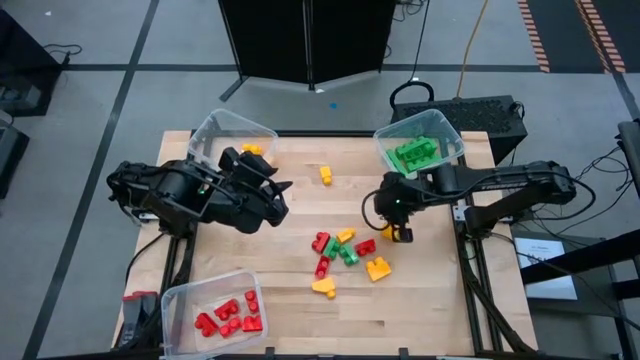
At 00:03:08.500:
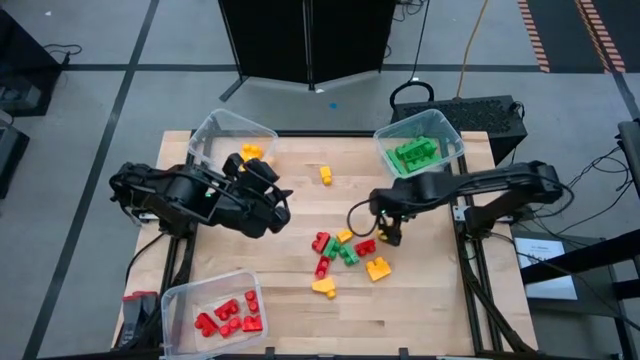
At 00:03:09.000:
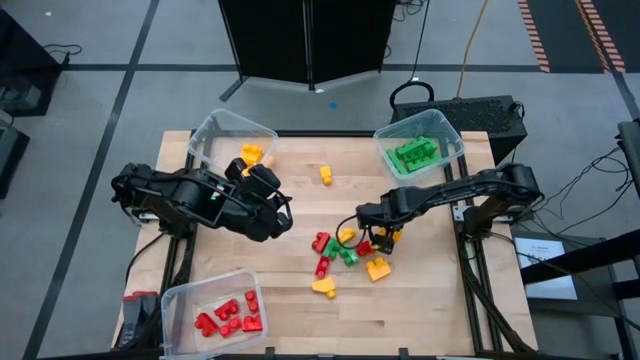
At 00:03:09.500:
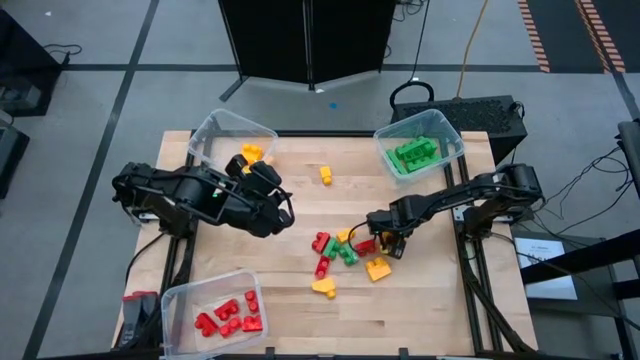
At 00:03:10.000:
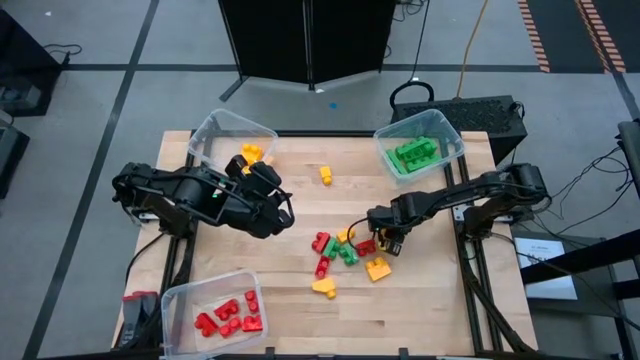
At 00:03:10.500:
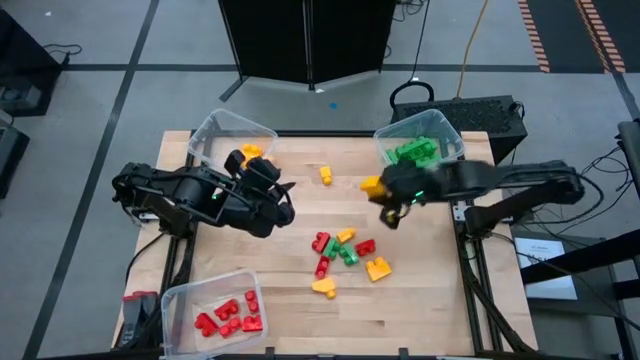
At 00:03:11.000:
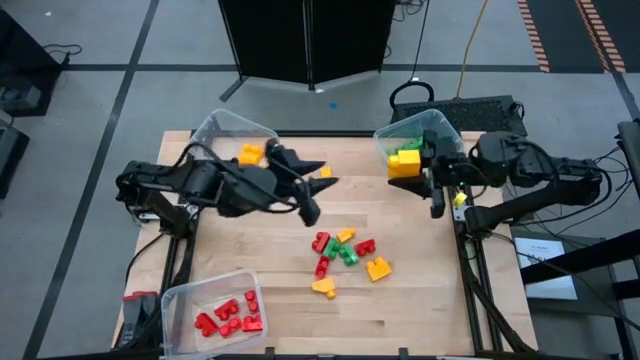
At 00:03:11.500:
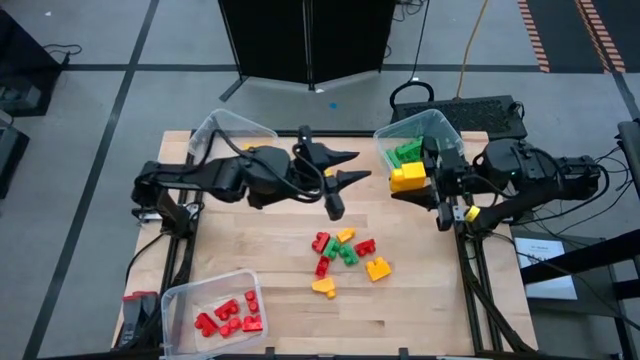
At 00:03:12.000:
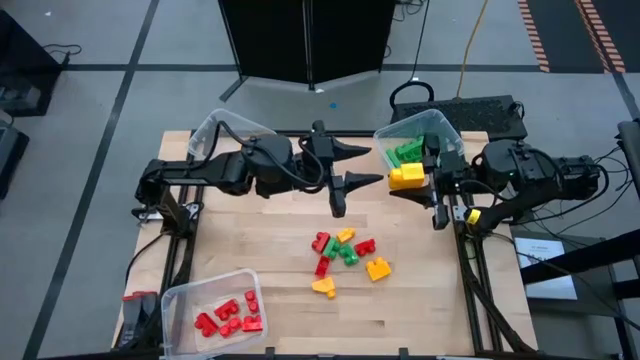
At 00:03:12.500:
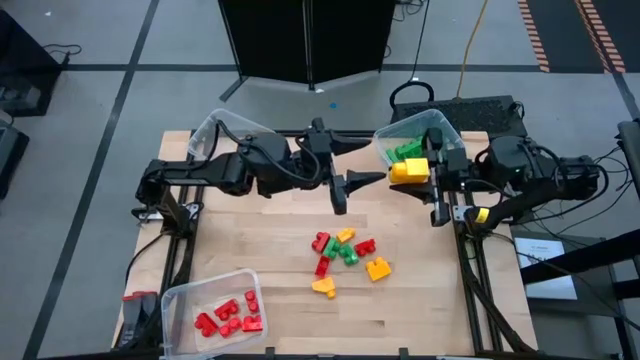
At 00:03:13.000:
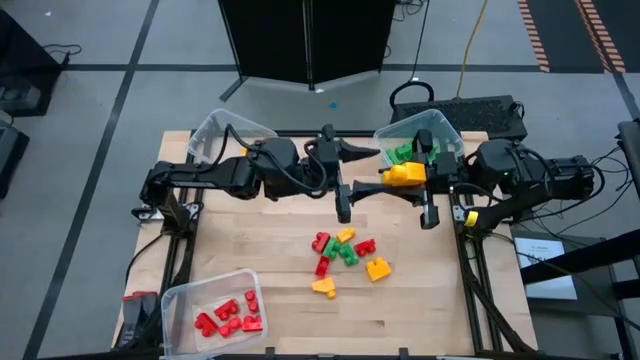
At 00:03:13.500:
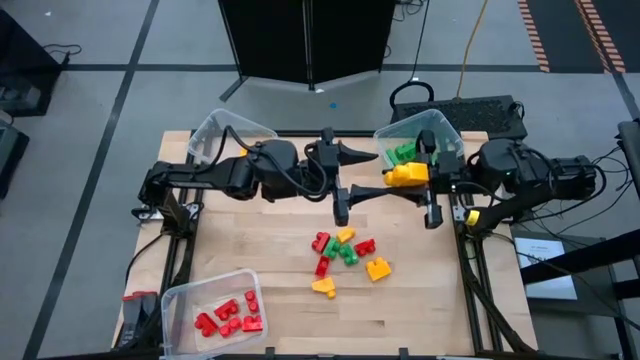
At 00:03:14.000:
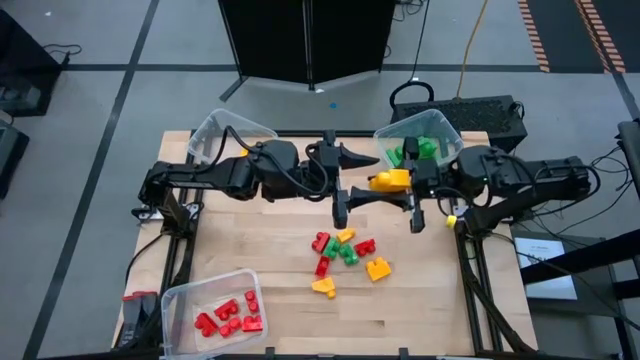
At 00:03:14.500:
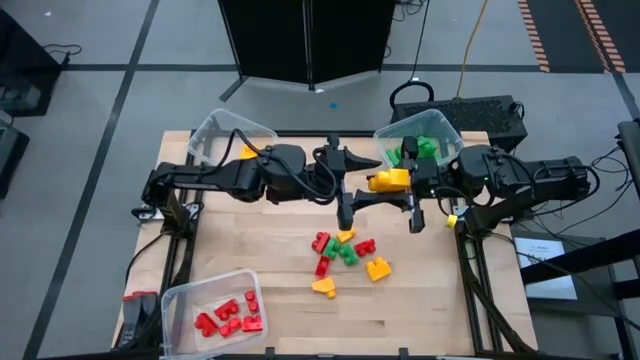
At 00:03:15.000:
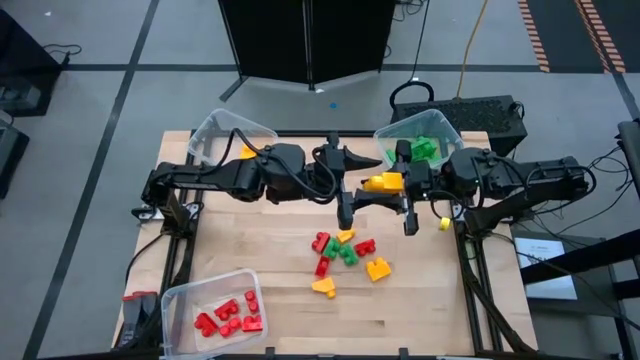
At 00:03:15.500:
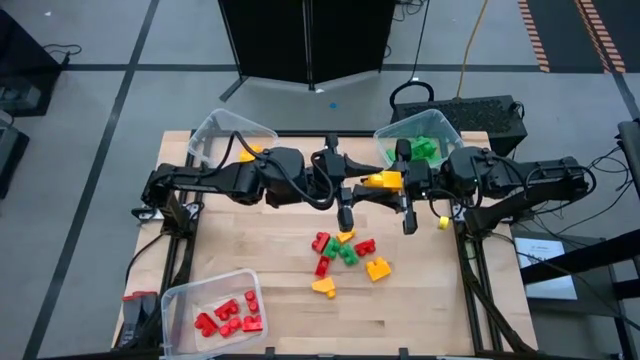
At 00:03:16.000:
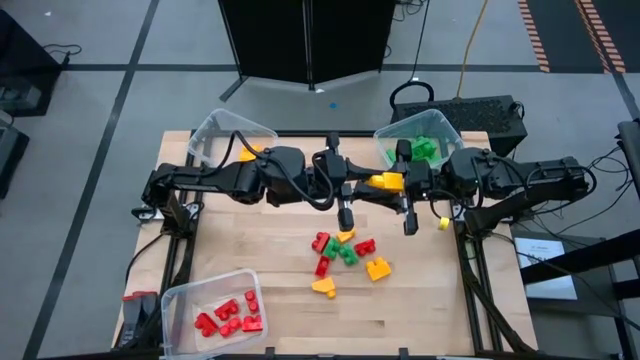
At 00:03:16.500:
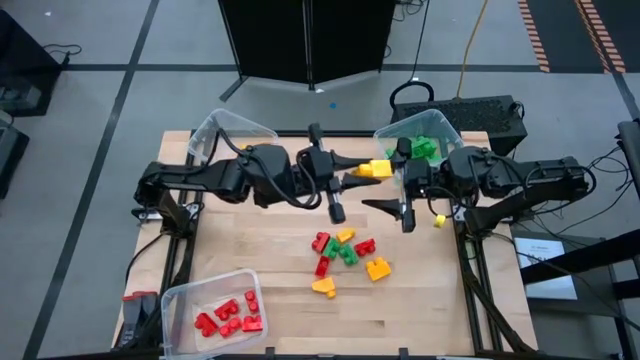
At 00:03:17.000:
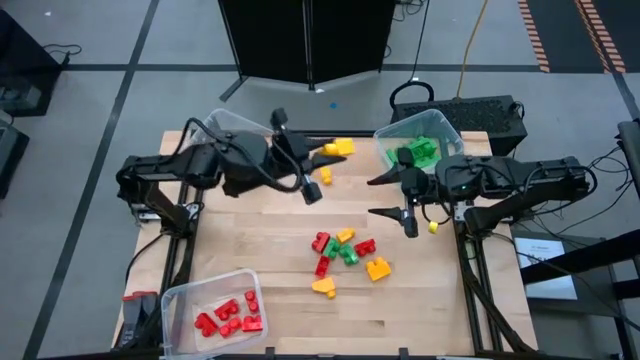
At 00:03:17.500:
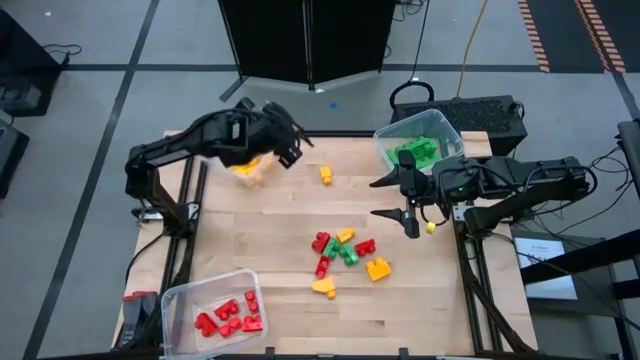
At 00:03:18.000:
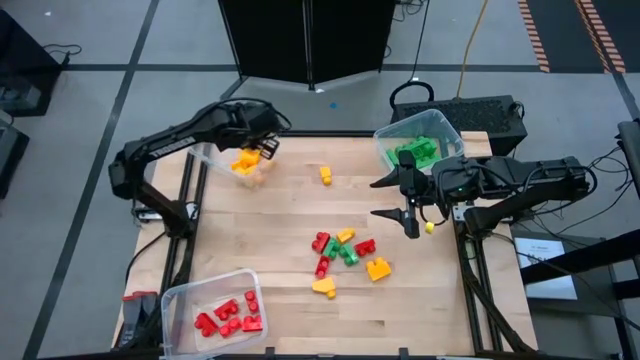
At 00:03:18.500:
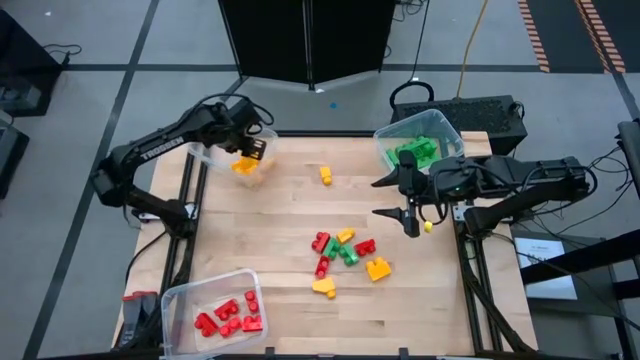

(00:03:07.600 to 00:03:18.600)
Task: Sort blocks
Put the yellow game piece into the top left transparent bin

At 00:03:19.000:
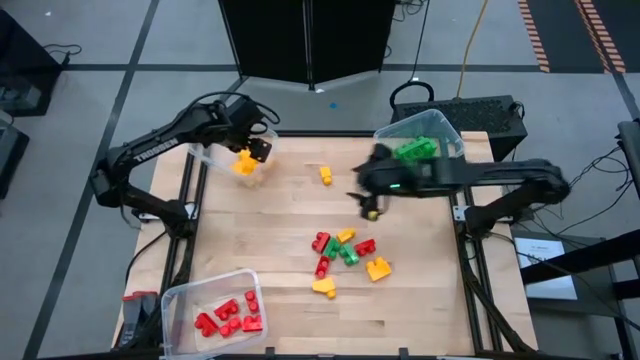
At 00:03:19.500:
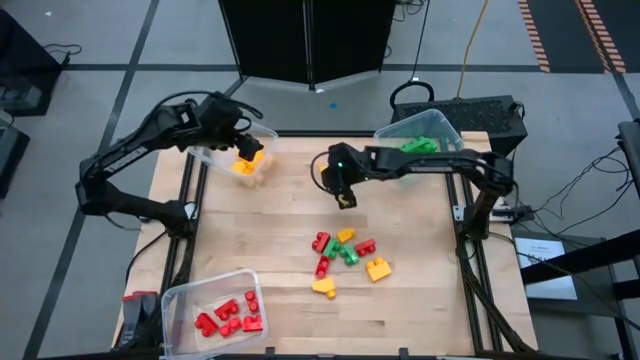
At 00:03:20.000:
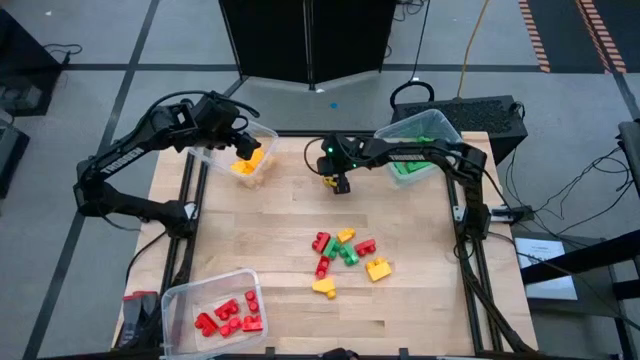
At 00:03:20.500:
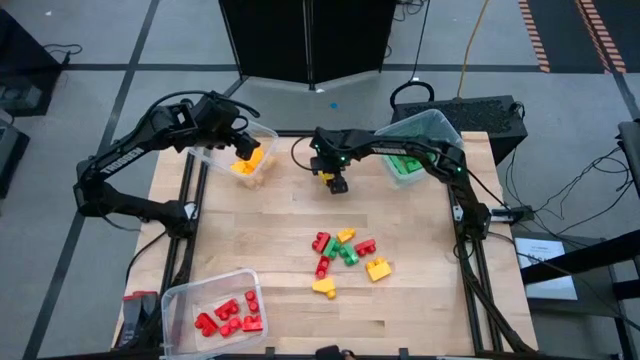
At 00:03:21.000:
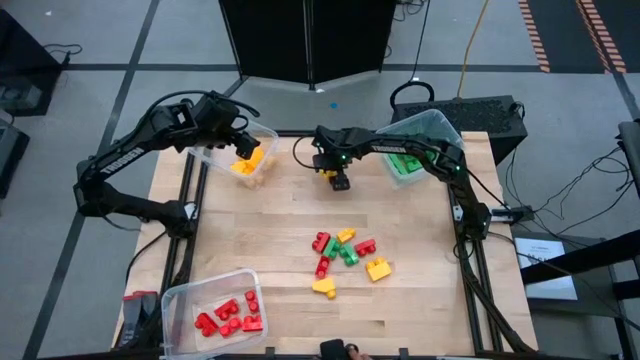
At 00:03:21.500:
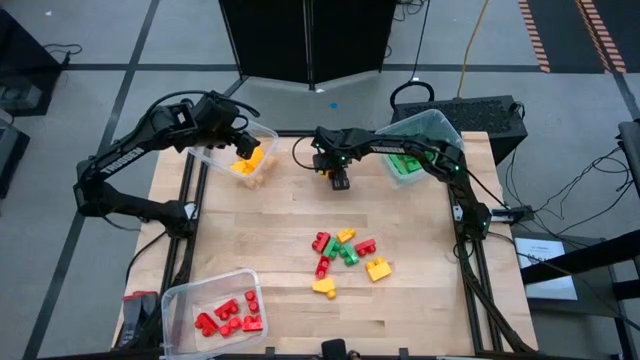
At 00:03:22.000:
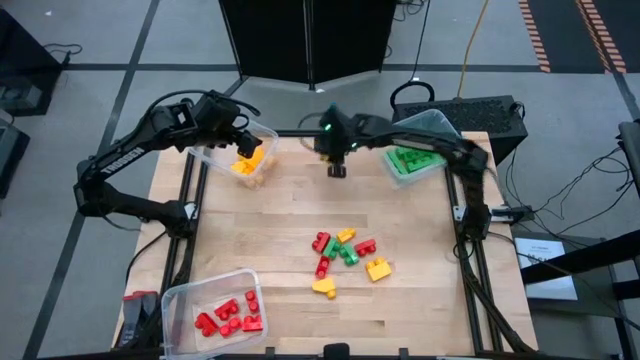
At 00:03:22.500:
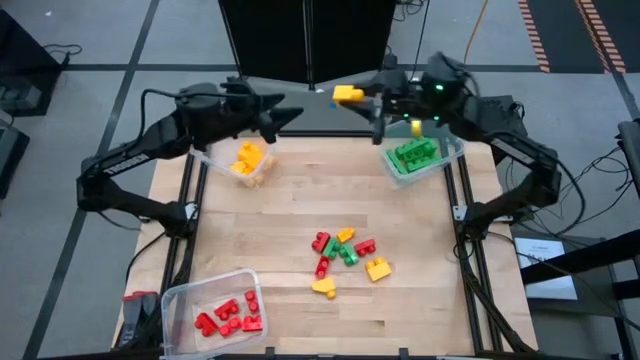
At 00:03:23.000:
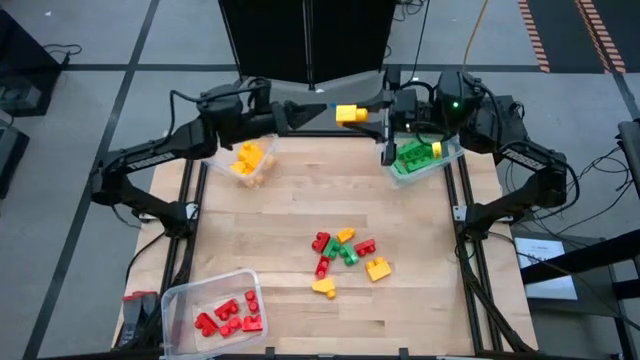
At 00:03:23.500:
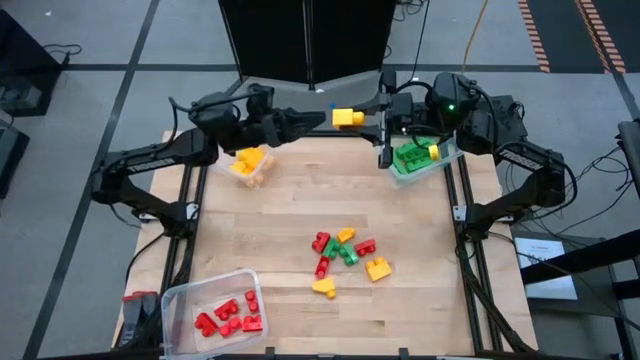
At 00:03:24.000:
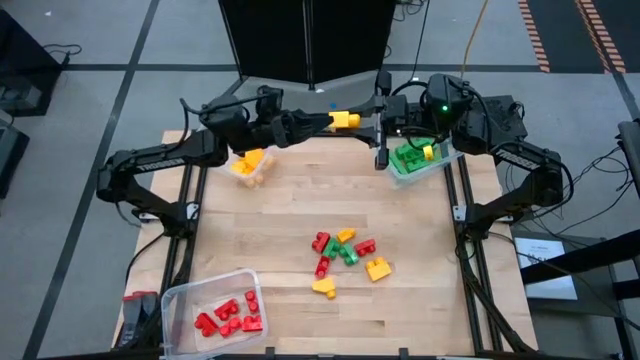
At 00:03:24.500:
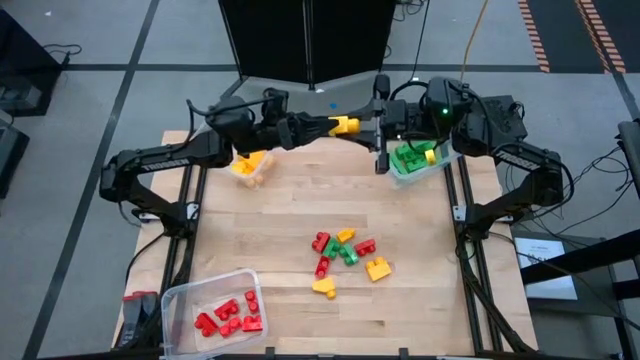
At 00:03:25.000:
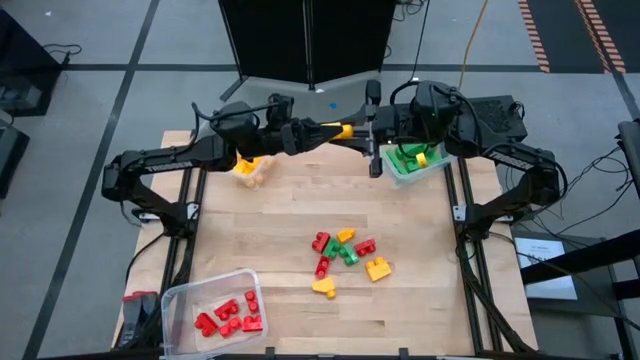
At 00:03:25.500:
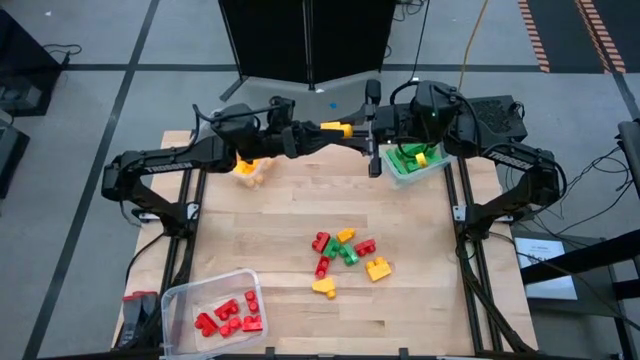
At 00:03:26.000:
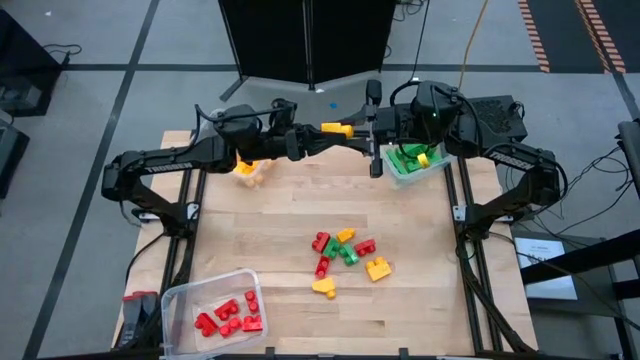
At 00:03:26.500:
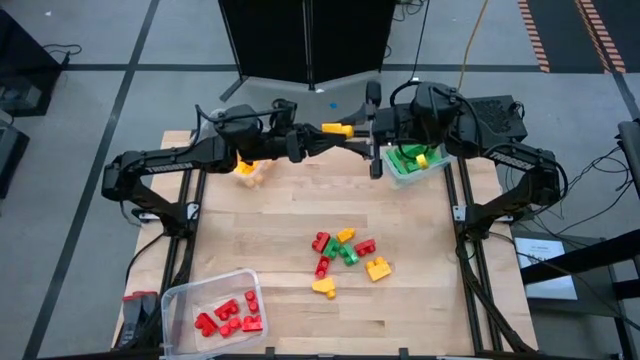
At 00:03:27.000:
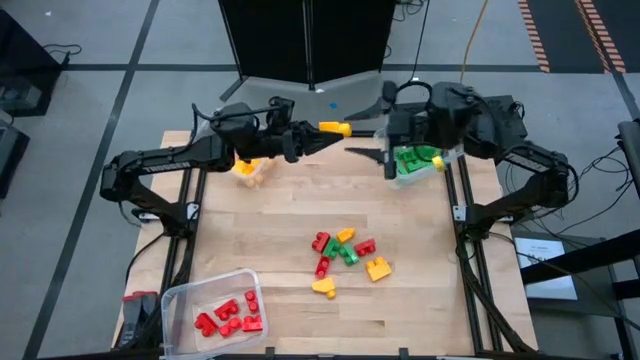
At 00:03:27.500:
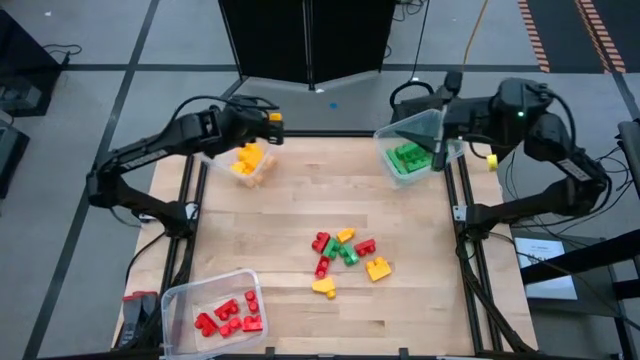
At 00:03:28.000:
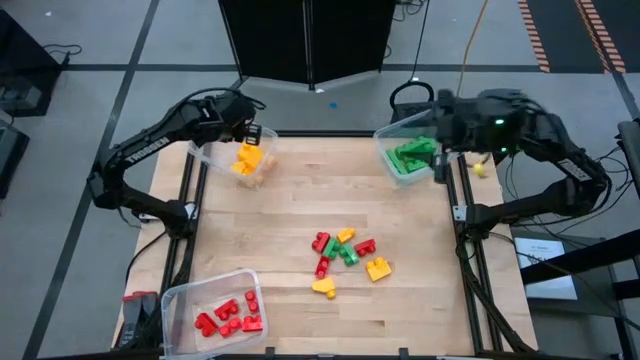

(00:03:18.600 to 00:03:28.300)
Put the yellow game piece into the top left transparent bin
